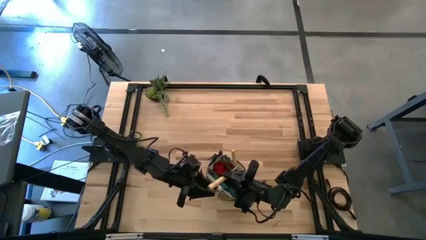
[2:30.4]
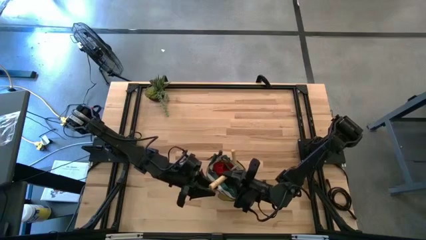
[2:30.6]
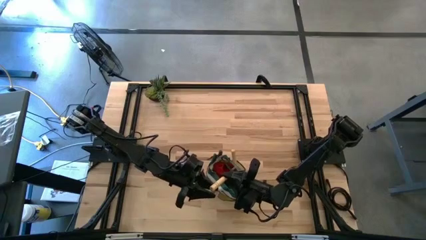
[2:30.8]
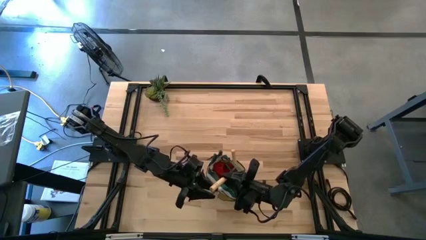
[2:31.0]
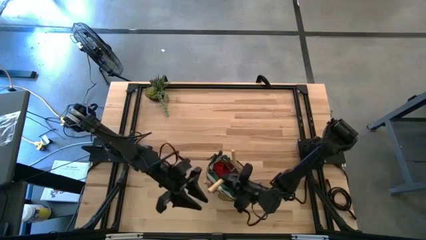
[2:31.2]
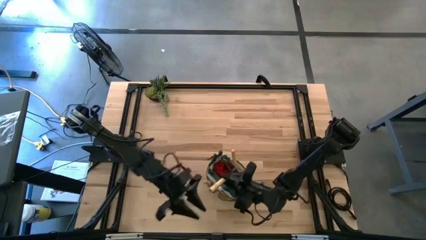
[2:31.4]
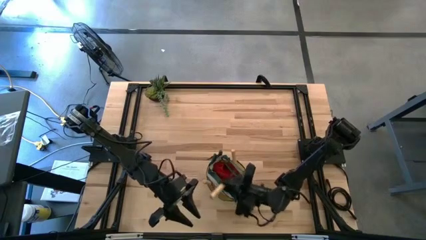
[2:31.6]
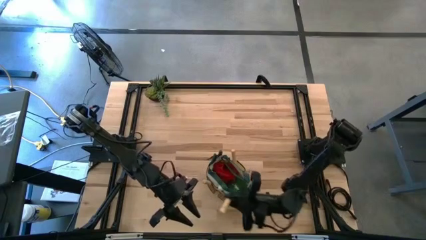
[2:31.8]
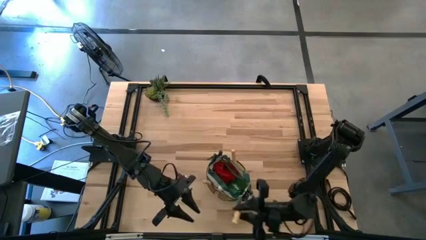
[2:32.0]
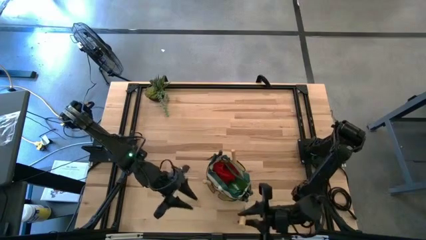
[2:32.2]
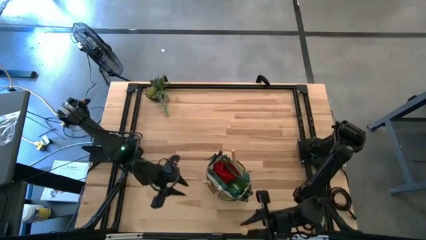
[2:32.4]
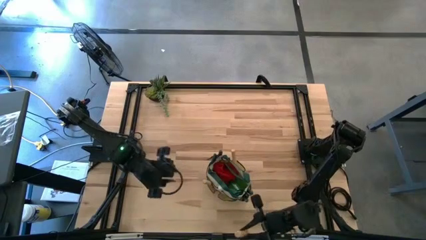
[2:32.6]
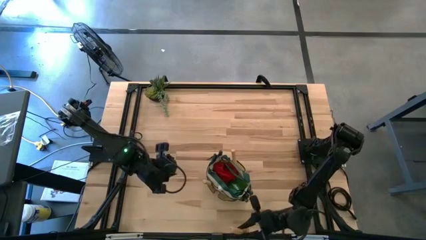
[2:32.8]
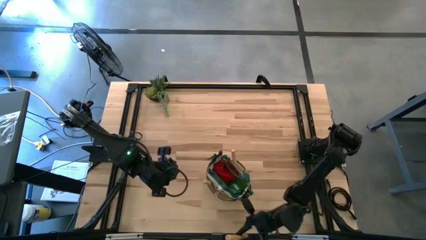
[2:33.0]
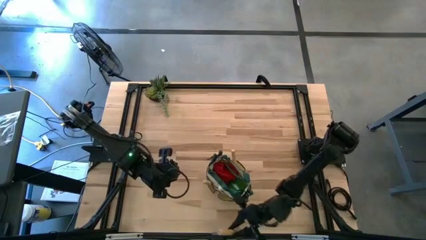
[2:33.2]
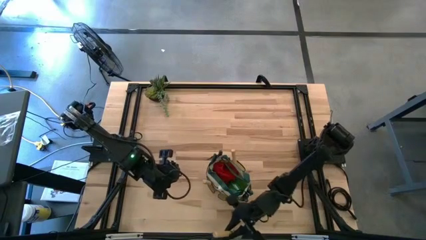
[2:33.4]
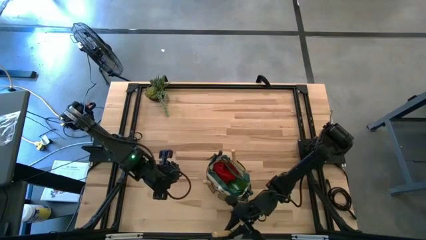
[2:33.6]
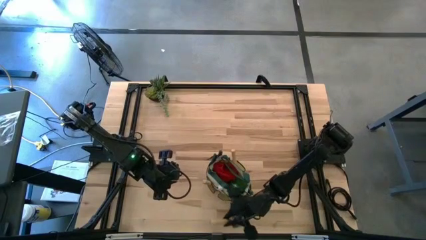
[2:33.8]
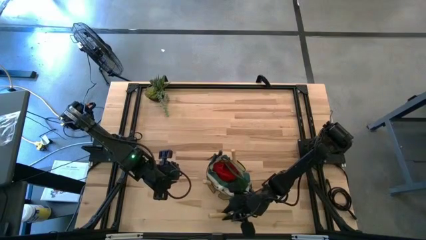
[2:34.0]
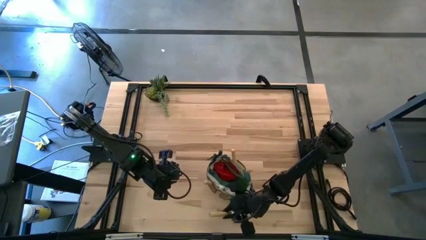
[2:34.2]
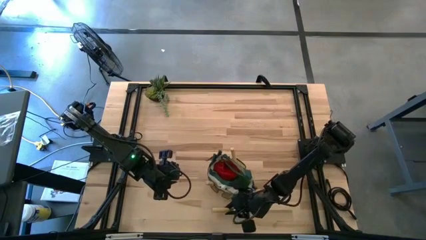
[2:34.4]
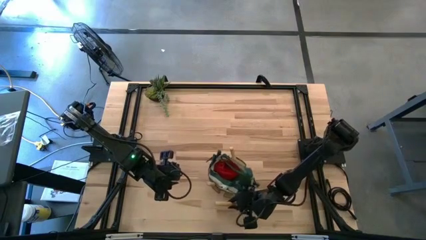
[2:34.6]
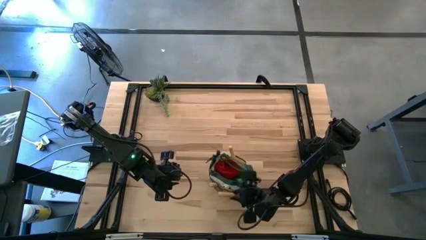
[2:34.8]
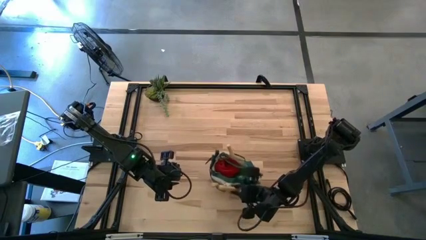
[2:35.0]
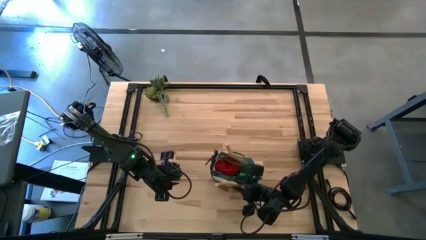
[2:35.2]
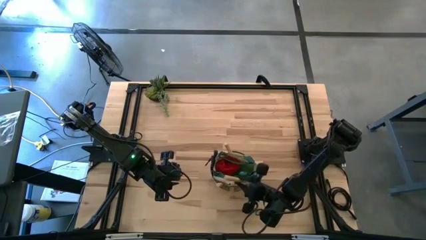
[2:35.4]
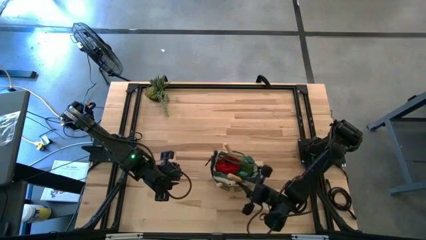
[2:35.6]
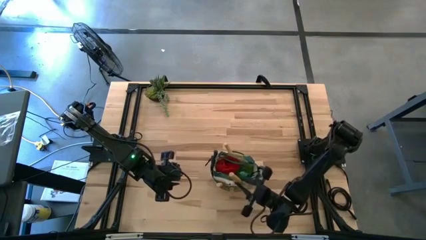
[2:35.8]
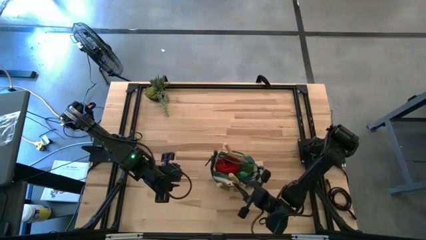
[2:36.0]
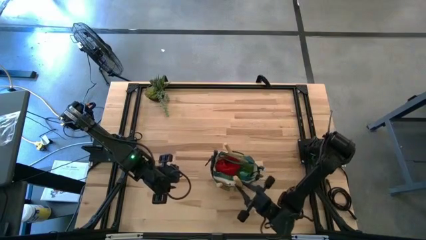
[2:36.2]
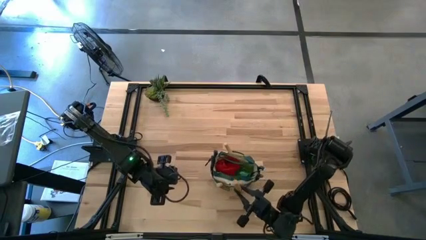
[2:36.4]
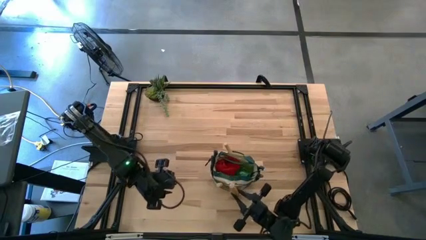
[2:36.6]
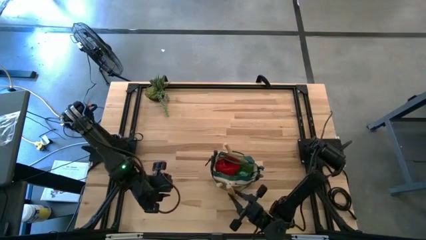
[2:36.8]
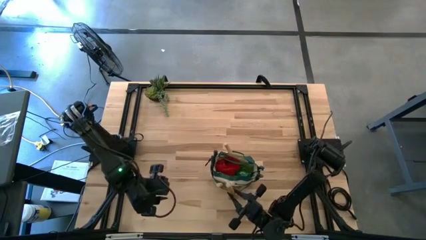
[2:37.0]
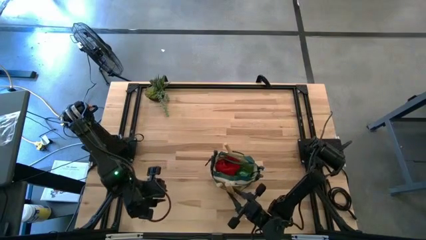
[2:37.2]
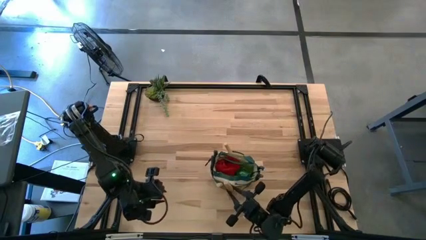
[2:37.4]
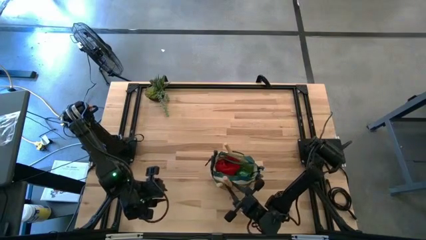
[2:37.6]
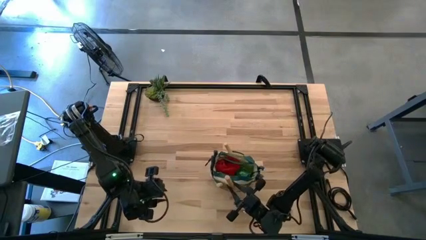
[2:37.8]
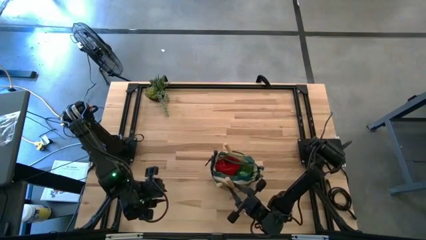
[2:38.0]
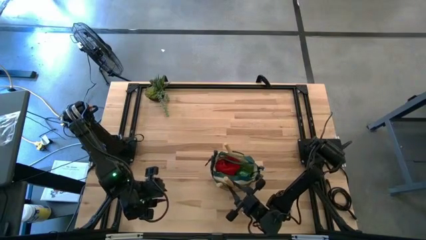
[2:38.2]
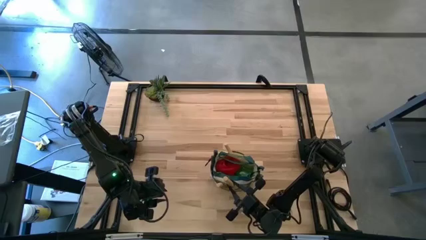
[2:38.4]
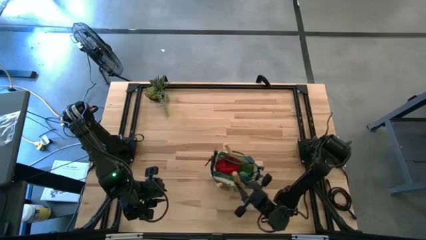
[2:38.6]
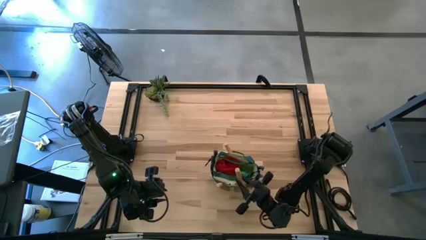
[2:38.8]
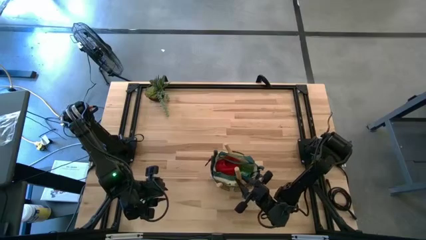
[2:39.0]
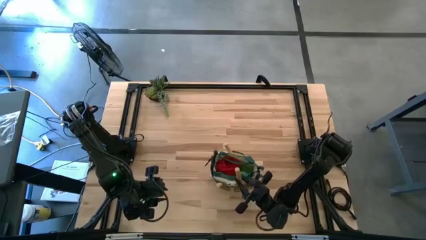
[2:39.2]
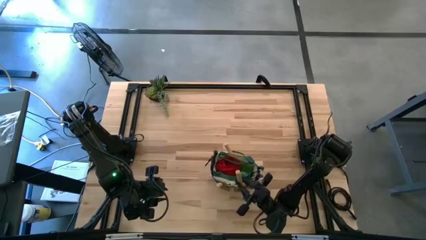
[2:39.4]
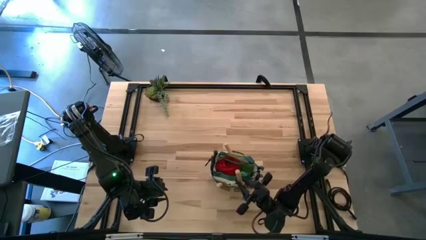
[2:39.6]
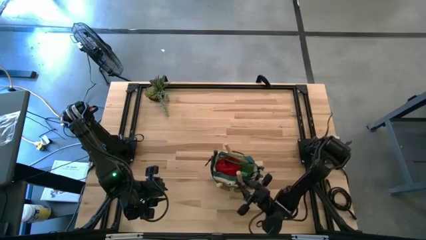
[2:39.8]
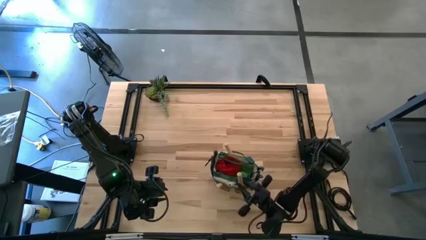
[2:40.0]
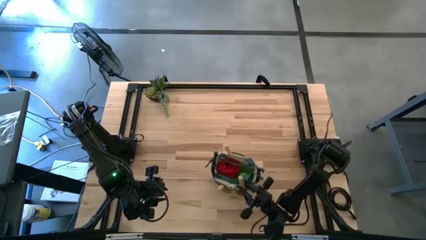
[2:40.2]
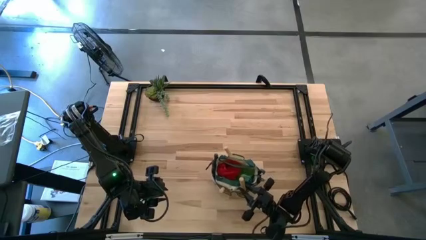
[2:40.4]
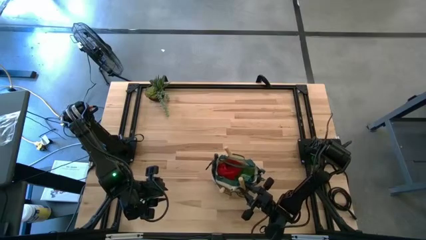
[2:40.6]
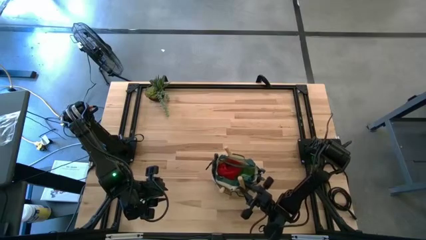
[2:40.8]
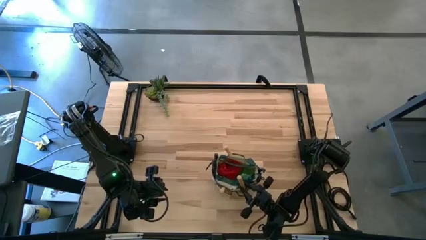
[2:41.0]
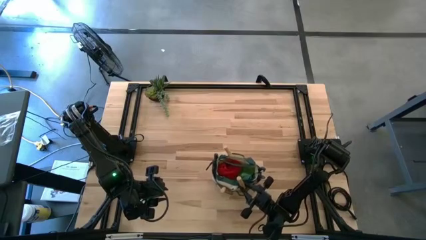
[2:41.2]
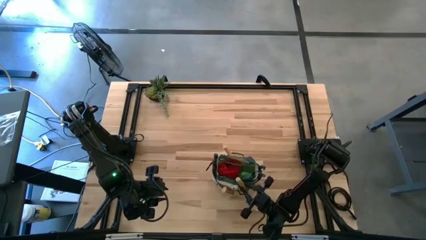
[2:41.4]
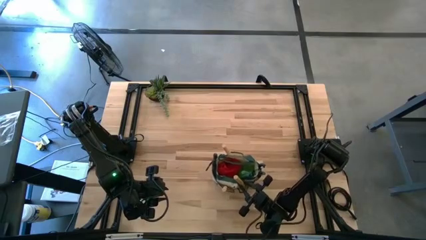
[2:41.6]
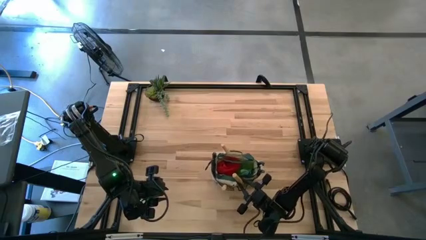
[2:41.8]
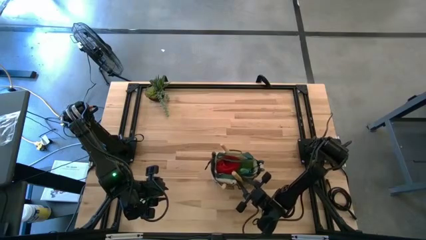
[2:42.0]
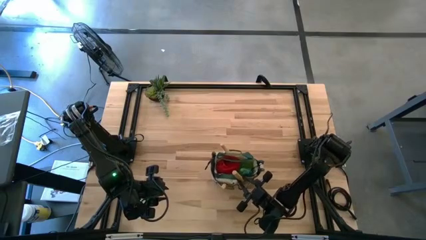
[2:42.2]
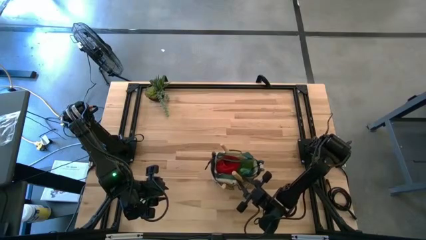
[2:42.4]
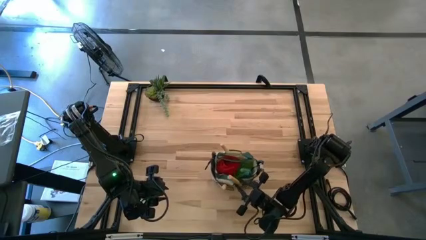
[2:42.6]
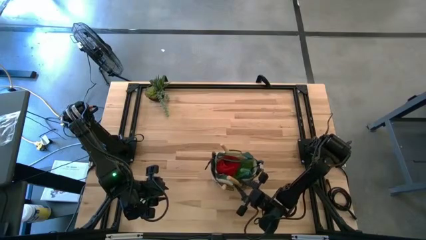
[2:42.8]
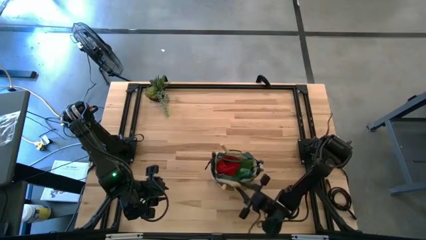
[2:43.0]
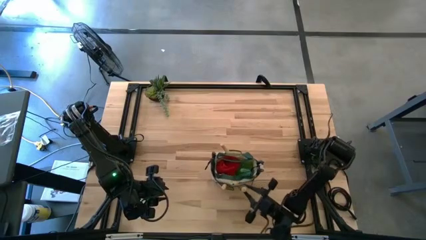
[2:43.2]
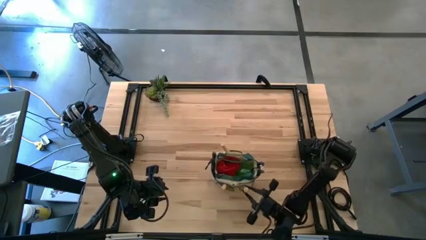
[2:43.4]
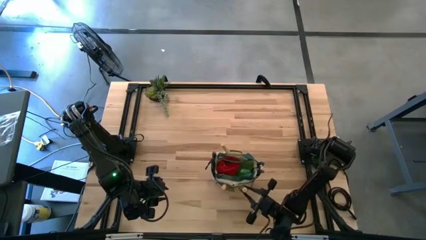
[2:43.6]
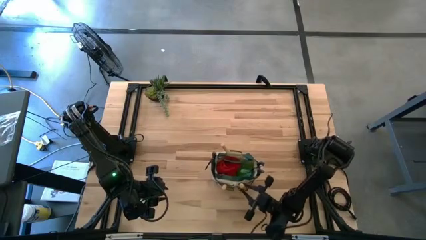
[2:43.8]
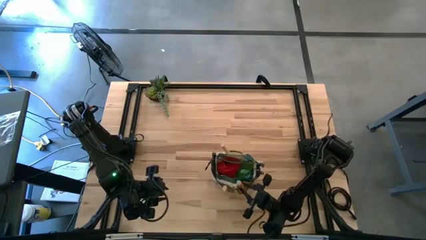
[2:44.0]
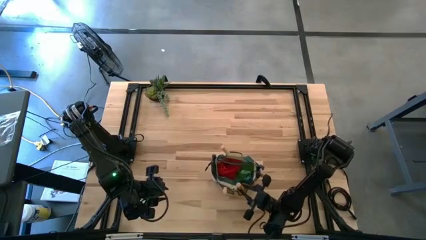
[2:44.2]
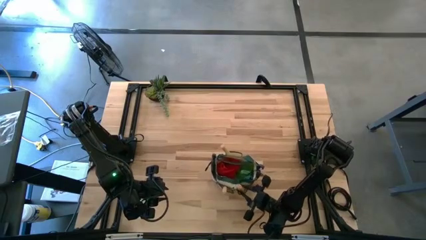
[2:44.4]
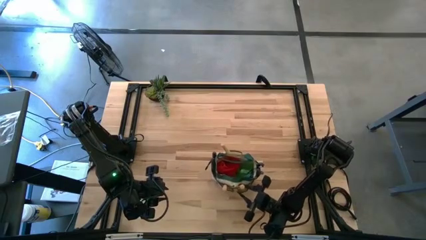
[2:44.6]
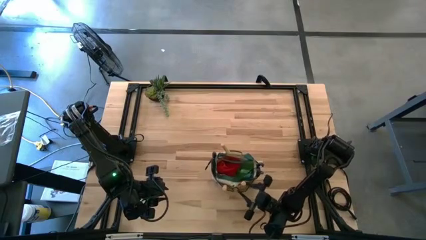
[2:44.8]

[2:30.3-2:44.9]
Task: Pick & Place Garden tools in Gardening bag
Put the trowel into the light brown gardening bag

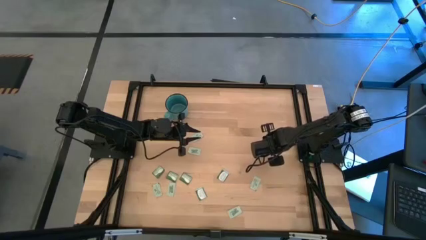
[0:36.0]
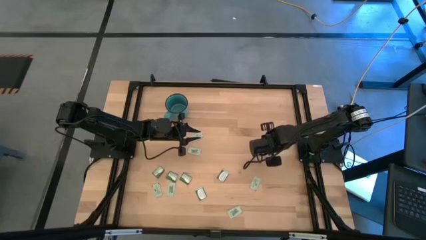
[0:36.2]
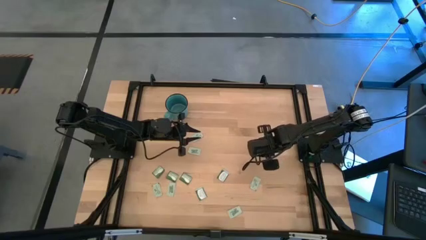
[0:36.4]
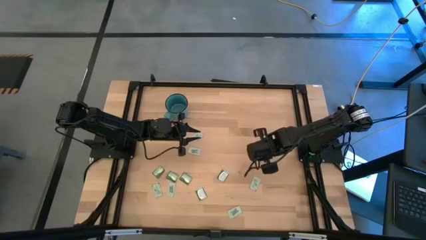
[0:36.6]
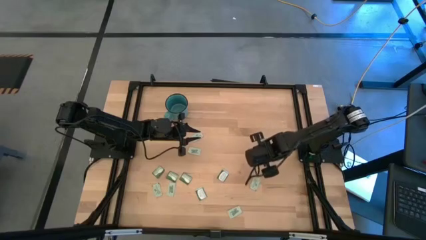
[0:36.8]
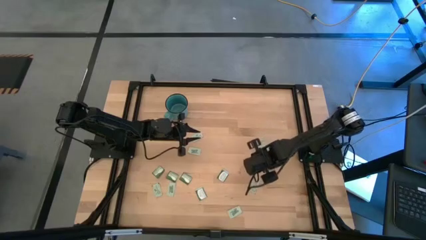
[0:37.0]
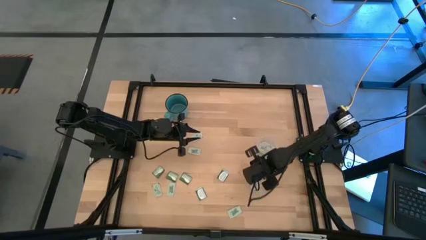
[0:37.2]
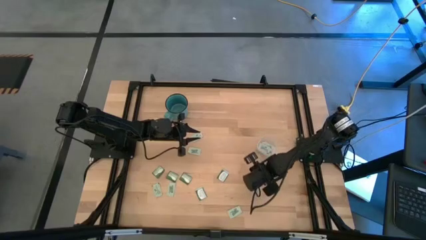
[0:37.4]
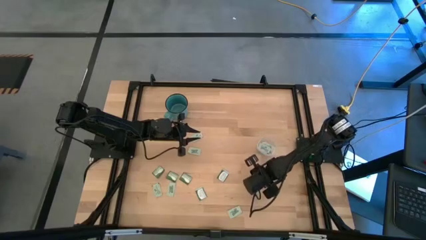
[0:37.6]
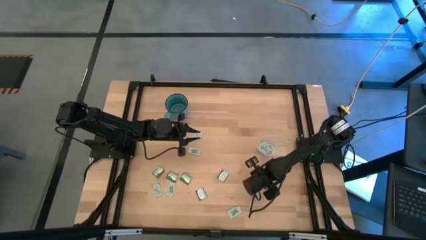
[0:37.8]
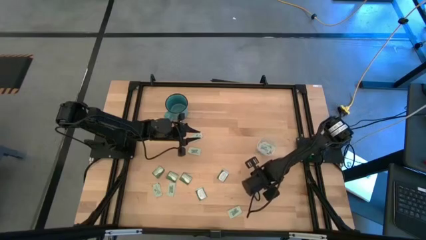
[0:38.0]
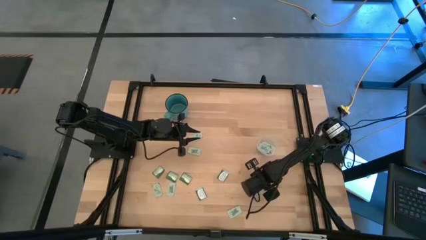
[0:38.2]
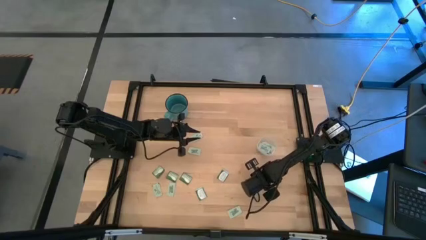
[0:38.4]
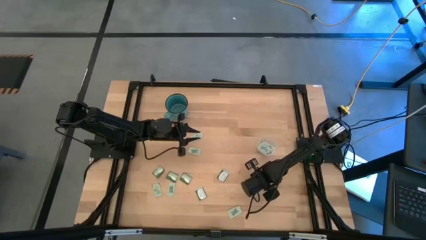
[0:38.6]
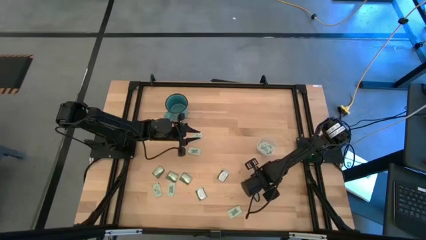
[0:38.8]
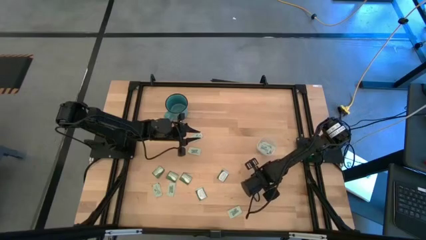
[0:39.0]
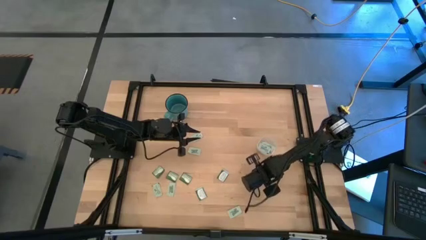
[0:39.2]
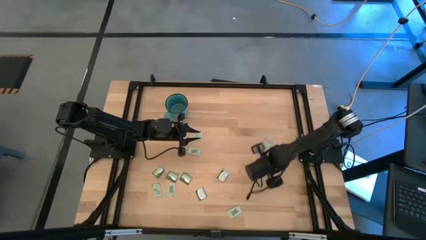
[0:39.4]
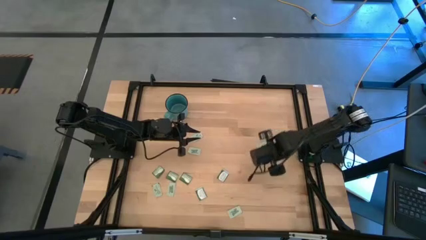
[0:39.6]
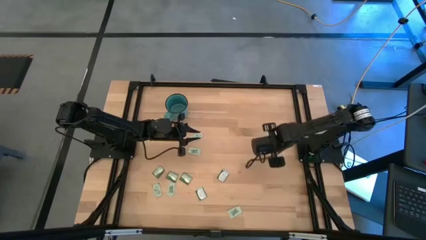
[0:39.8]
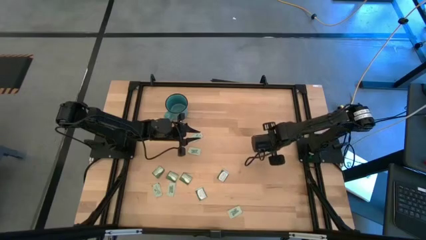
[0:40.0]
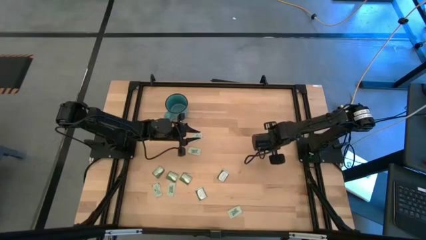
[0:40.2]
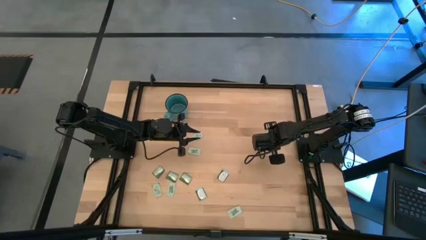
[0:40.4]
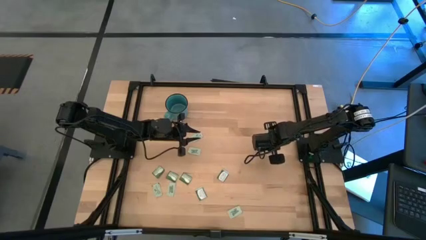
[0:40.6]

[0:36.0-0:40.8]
Task: Pick and place Stevia / Truvia into bins
Put the stevia packet into the transparent bin
